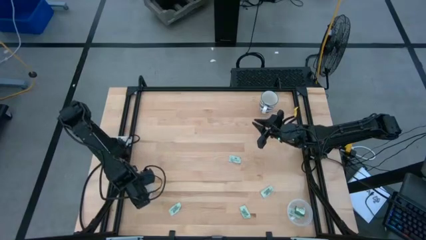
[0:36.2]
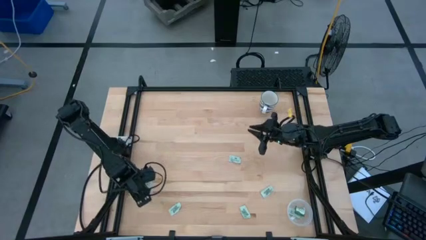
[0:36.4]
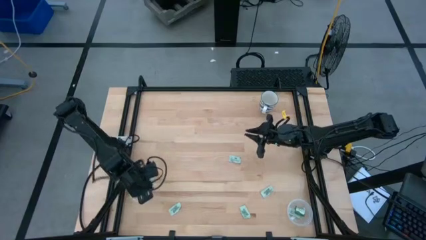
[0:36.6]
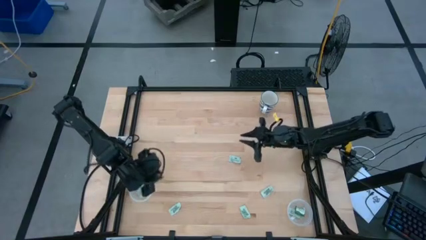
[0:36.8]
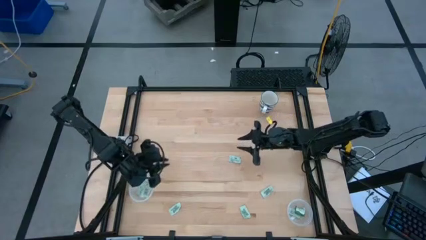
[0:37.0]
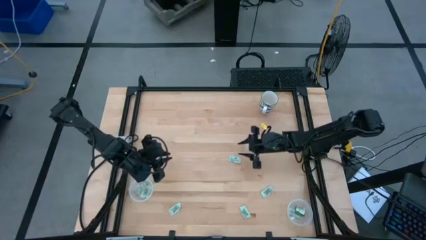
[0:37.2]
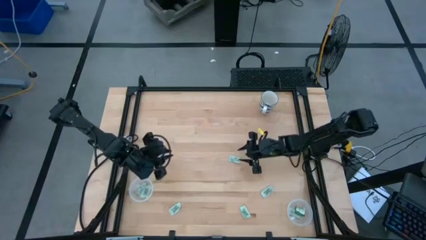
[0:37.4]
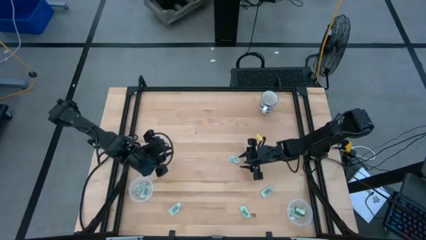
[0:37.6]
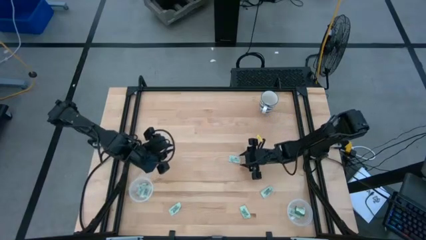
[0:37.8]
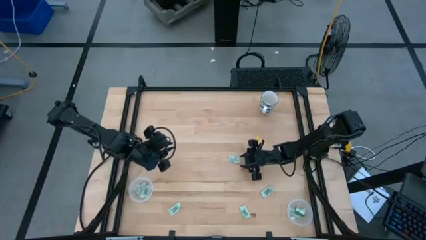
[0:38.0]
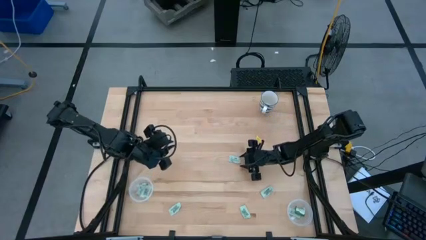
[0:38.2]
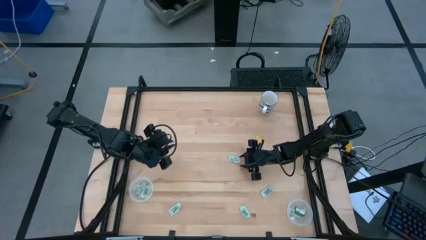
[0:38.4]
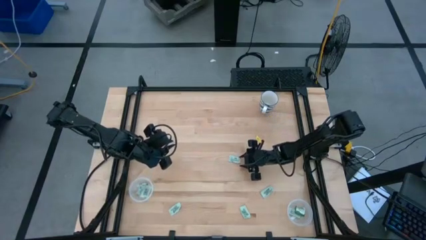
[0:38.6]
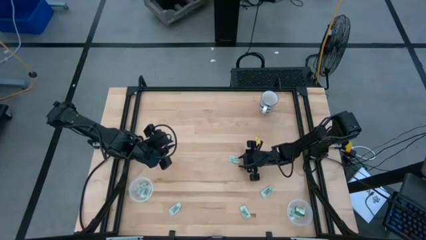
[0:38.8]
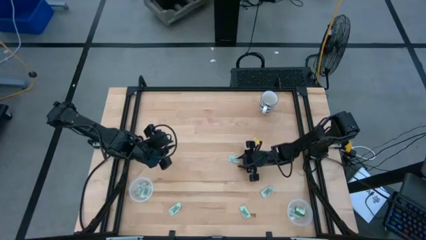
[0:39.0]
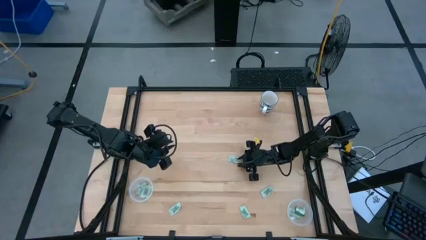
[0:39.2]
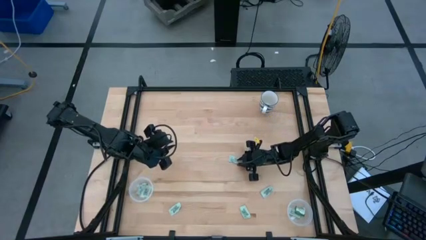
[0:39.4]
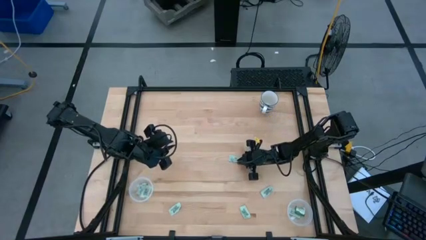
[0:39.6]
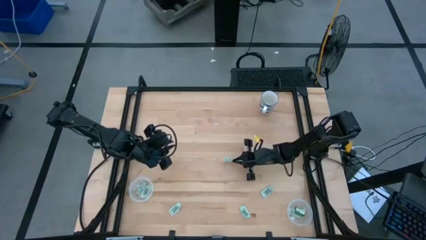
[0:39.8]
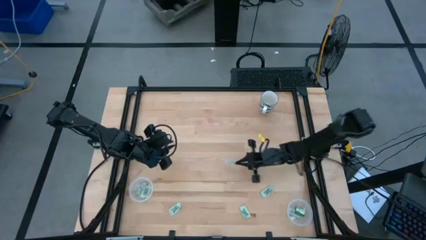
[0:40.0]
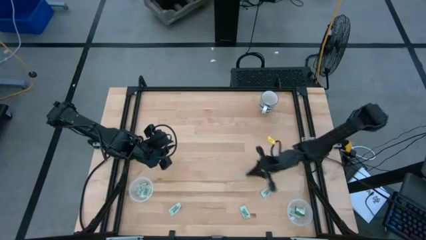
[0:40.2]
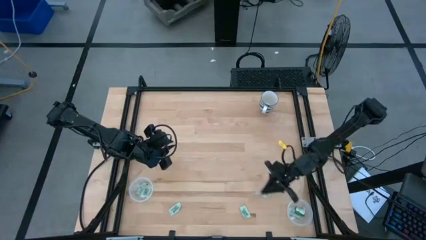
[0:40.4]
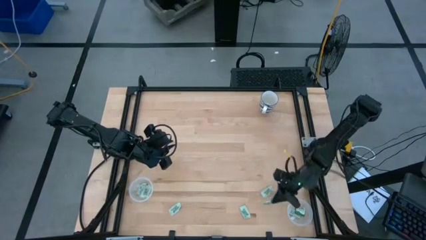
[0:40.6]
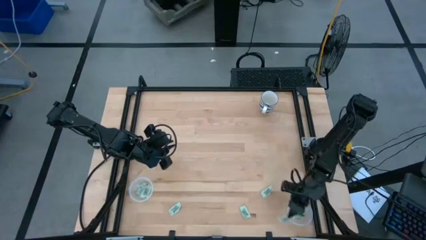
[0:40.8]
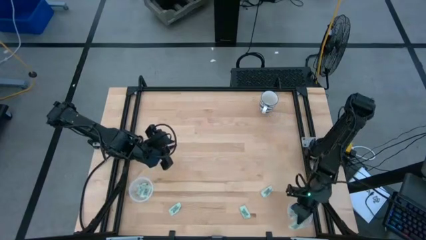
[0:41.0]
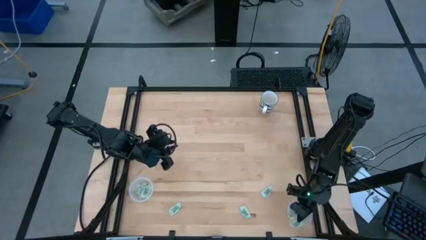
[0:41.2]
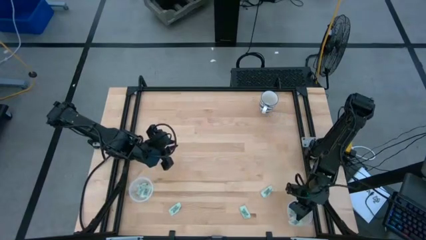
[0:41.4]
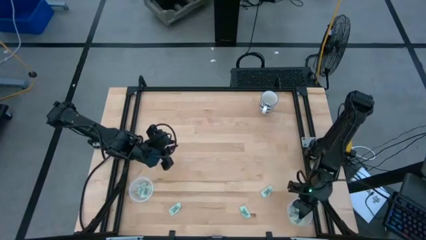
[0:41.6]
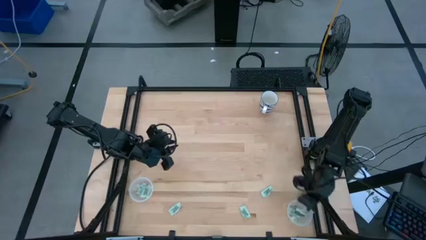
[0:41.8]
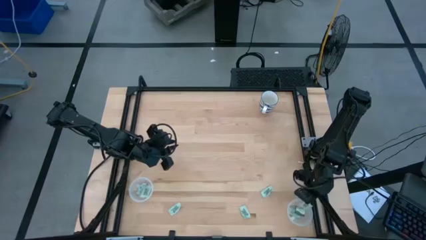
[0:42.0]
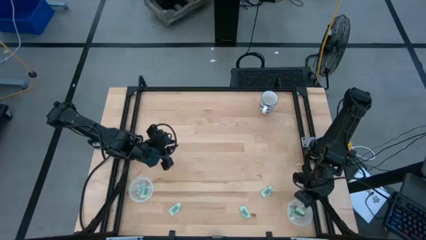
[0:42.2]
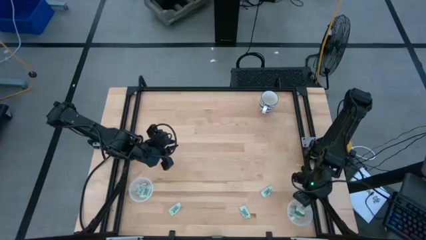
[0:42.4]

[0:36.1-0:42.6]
Task: Pick and place Stevia / Truvia into bins
Put the stevia packet into the bottom transparent container

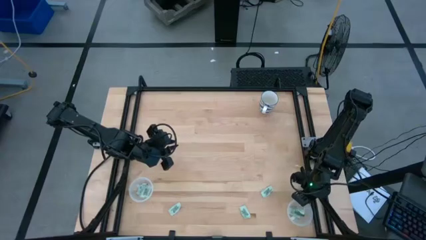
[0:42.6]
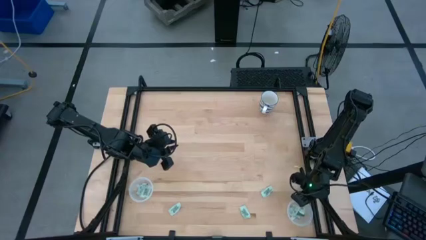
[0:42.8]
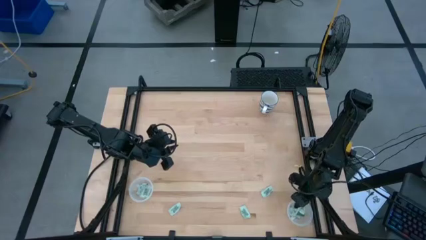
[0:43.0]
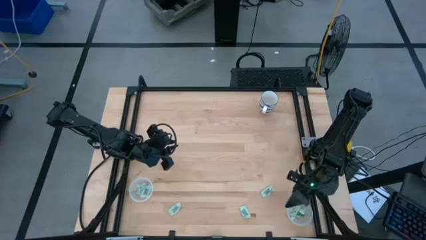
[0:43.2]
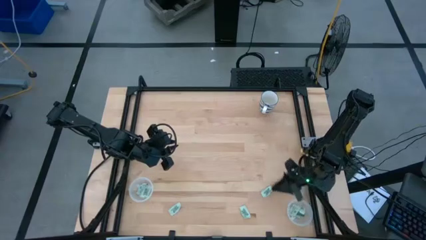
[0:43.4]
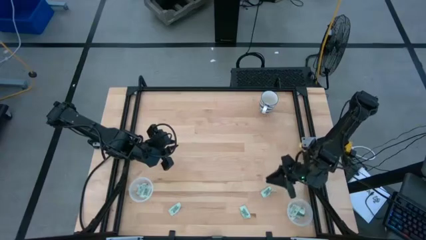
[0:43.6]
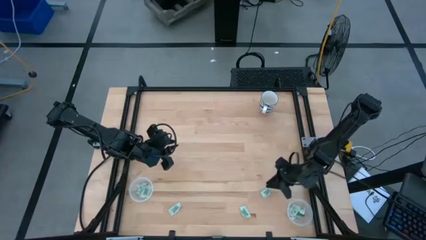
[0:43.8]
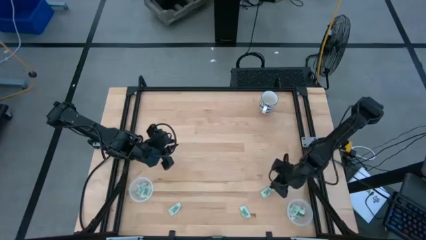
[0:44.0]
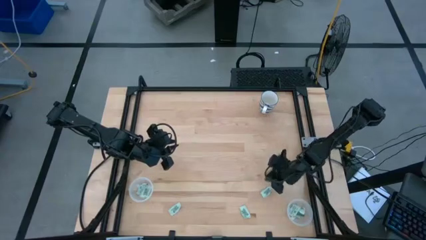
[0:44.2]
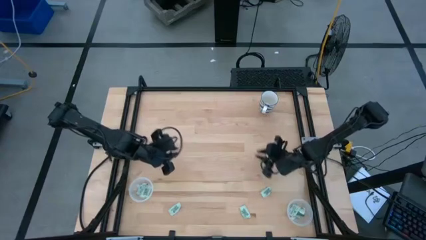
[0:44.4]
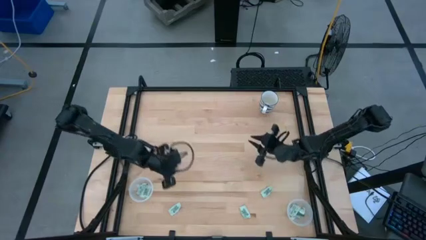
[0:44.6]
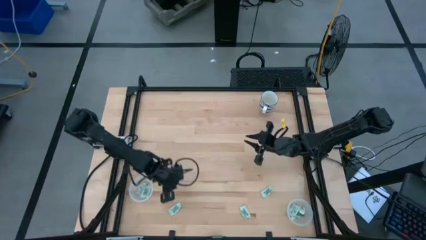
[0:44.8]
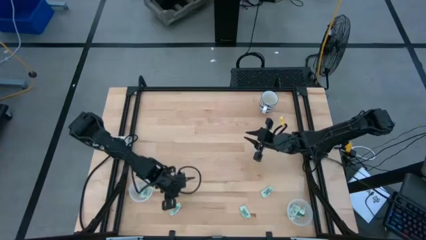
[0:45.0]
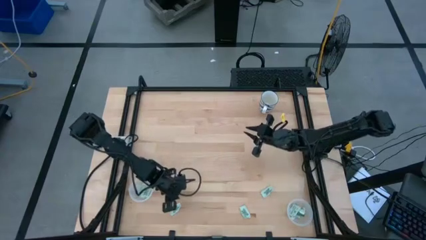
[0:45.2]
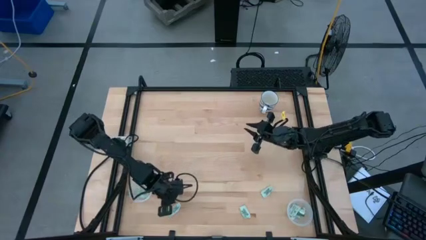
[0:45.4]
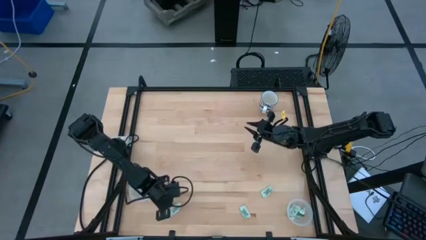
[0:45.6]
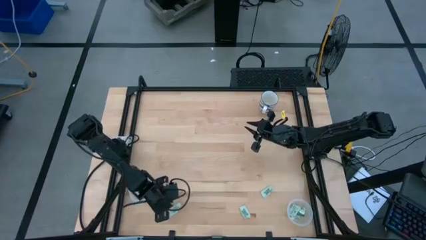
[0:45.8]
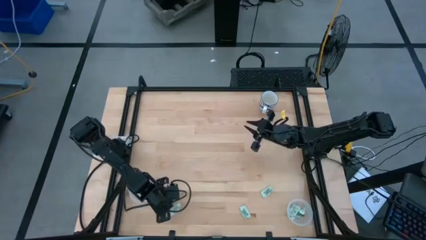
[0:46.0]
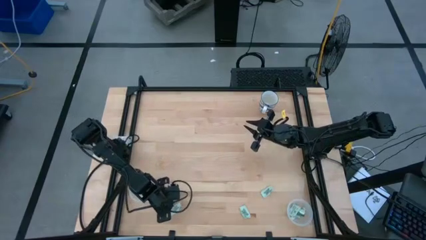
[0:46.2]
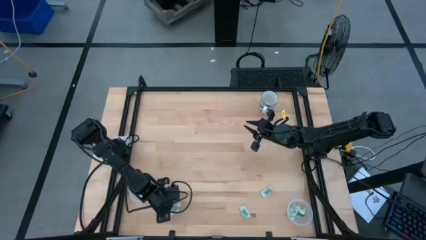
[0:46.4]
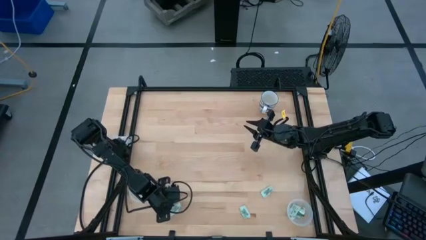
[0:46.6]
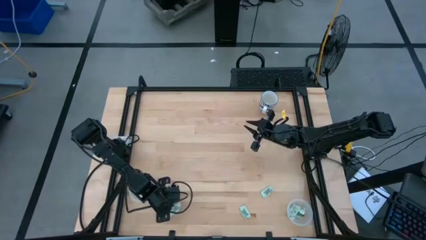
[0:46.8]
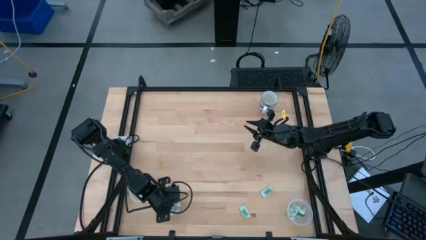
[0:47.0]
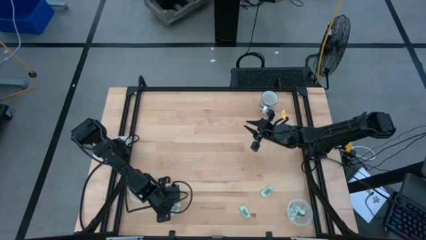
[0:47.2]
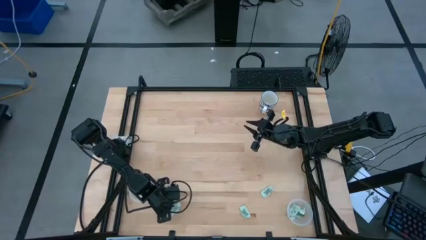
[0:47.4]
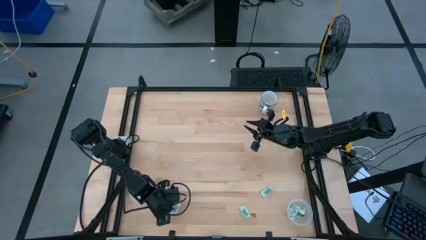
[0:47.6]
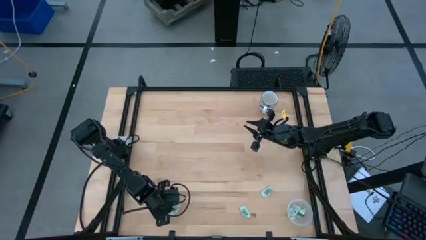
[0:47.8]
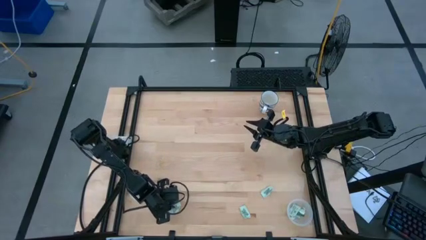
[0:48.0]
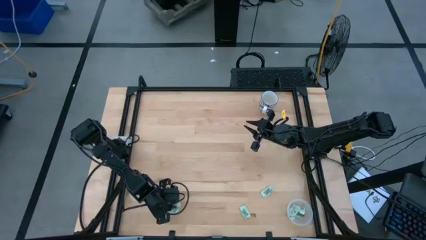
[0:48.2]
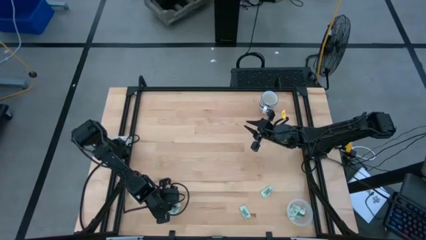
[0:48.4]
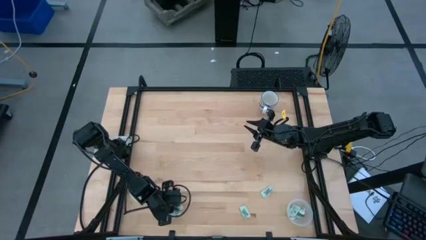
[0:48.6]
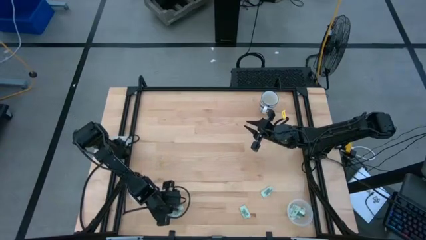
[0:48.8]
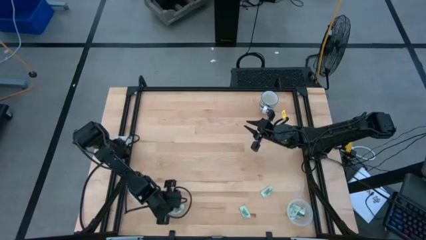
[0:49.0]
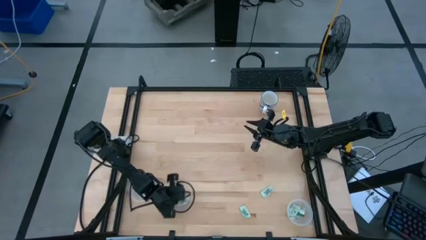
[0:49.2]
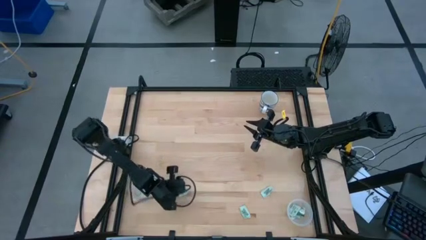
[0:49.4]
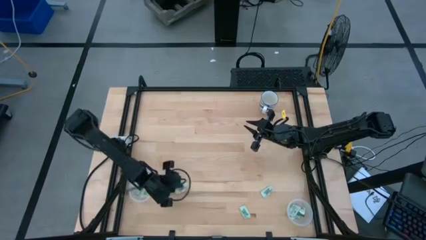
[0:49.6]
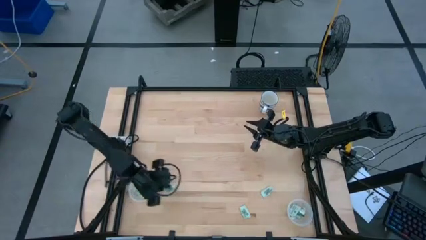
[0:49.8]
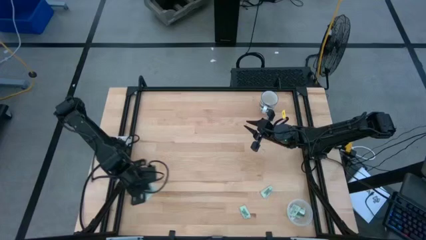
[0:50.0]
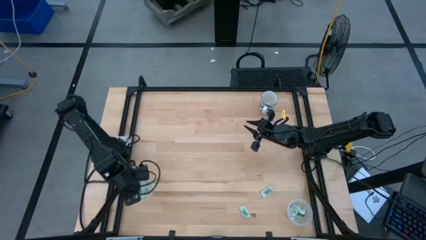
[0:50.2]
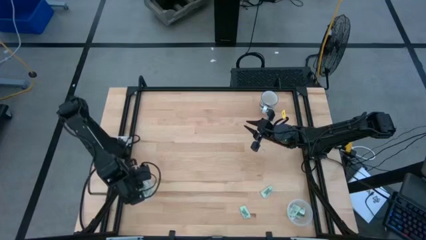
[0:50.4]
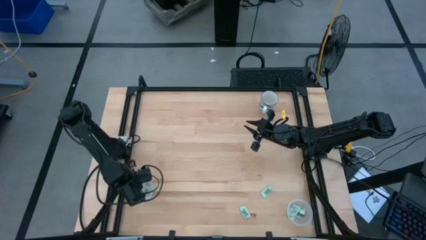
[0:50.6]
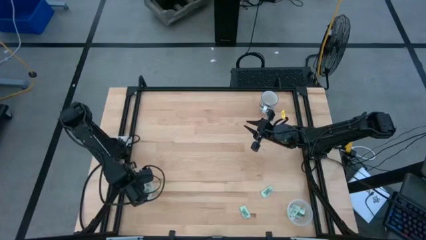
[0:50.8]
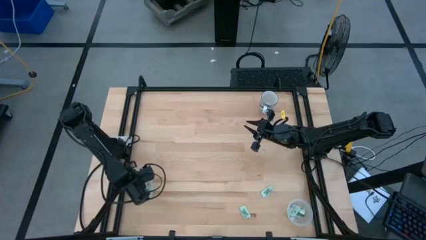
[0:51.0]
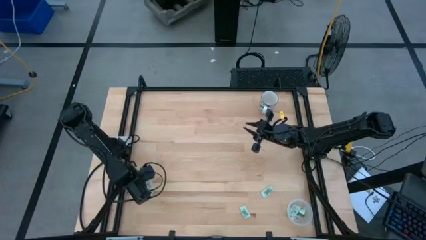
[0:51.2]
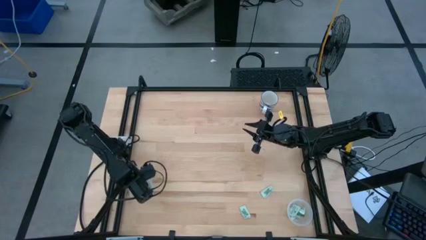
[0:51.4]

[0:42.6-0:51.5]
Put the stevia packet into the top transparent container
